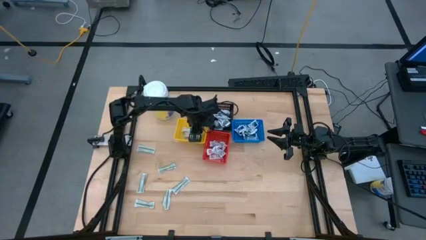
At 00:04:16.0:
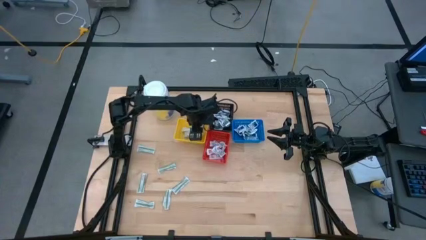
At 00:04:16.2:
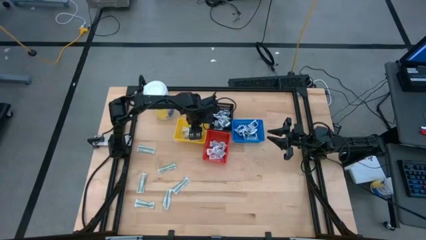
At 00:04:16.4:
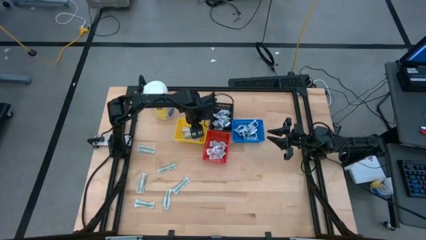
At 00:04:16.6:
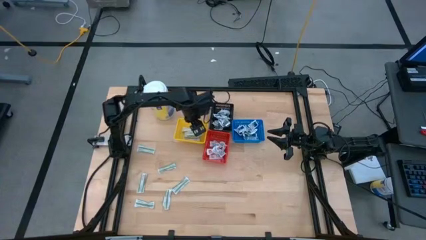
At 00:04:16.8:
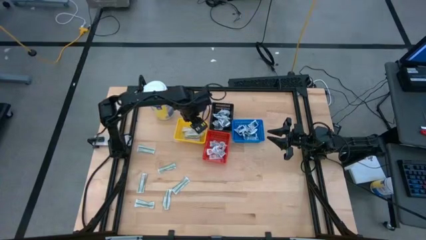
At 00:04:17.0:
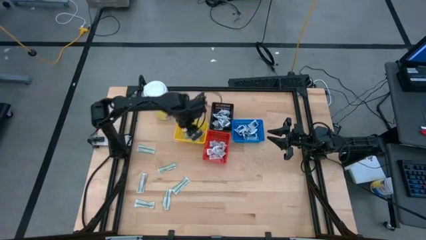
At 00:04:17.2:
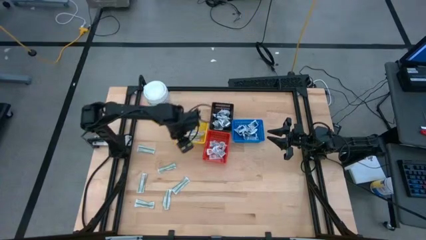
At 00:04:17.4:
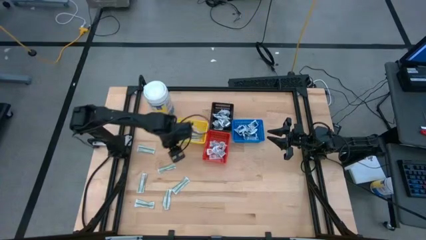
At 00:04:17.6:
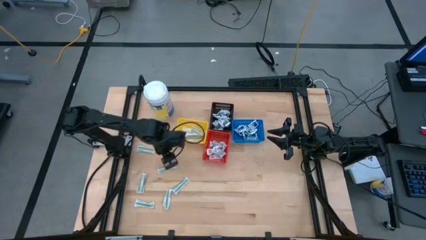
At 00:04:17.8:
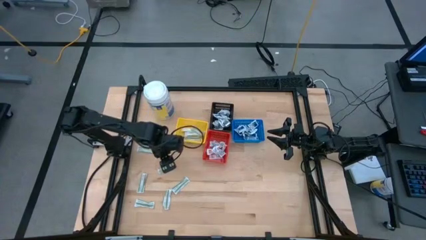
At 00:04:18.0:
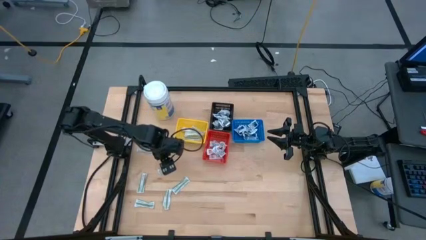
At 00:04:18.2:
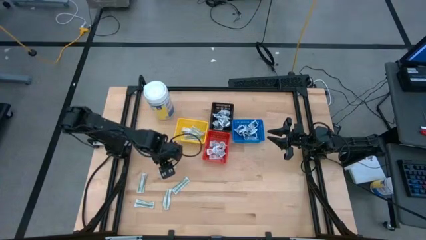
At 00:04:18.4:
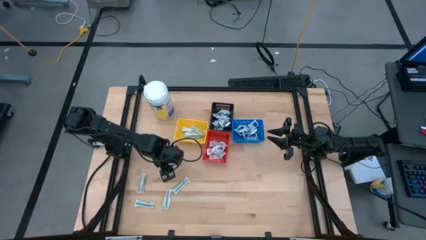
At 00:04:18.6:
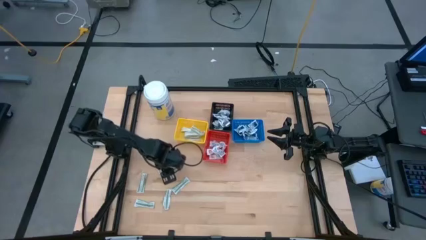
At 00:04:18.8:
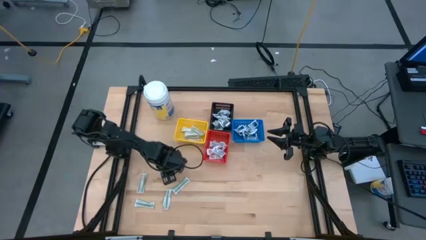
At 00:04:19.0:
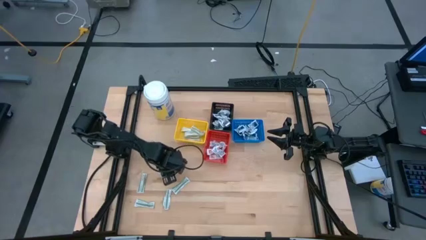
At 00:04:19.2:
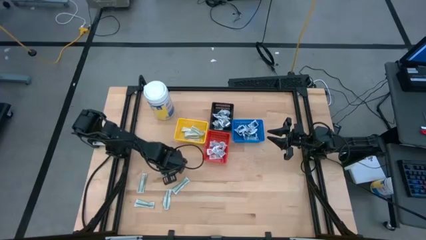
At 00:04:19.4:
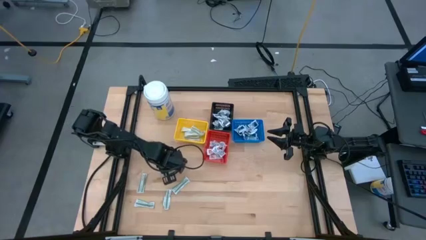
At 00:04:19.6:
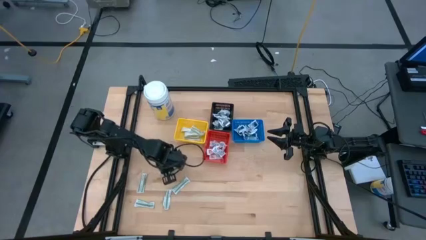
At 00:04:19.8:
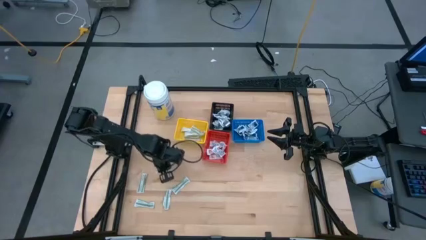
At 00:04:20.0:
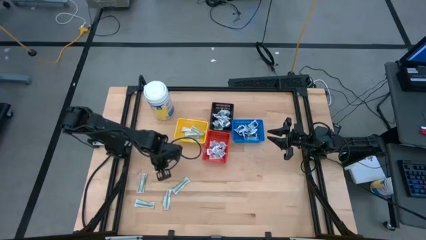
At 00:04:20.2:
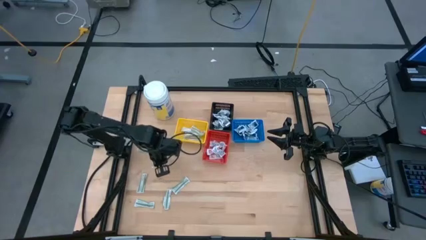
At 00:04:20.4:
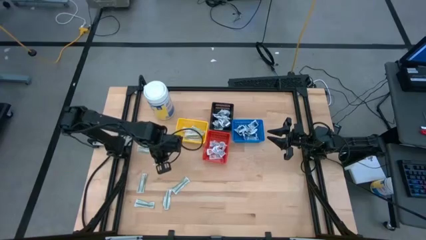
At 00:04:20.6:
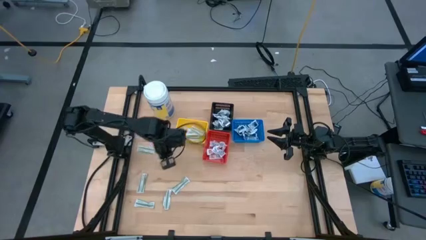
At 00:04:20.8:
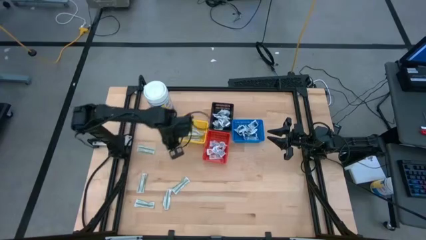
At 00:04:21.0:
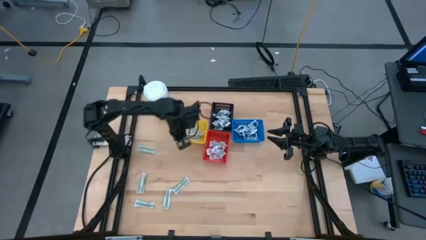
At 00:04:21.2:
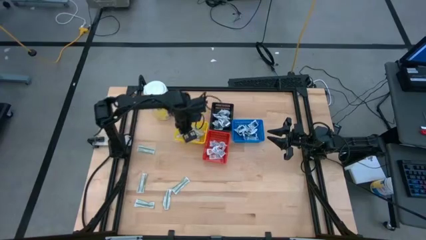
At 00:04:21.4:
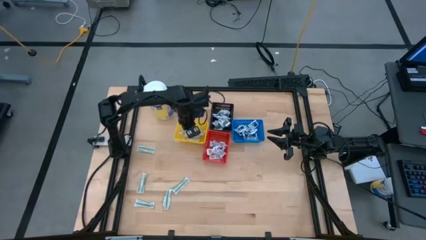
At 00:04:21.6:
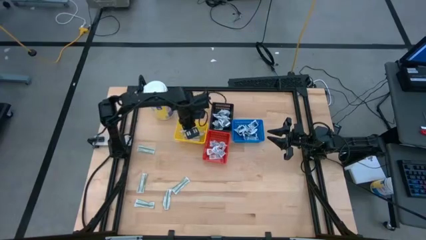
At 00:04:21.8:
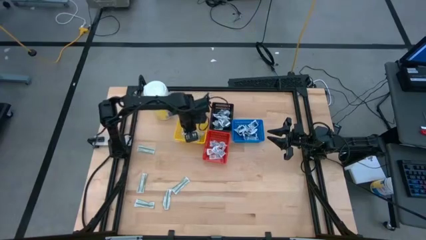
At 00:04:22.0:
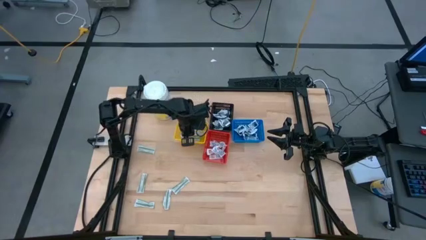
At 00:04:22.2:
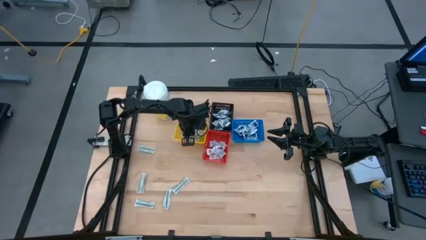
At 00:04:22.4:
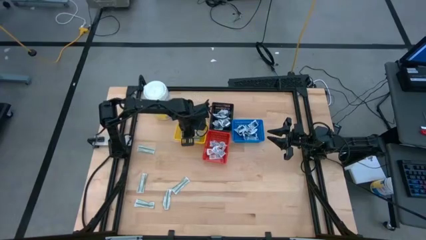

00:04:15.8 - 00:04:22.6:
Task: Pick & Place First Aid Supplies
Put the bandage pack into the yellow bin

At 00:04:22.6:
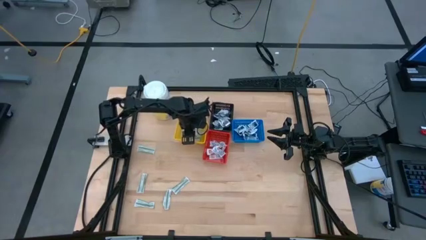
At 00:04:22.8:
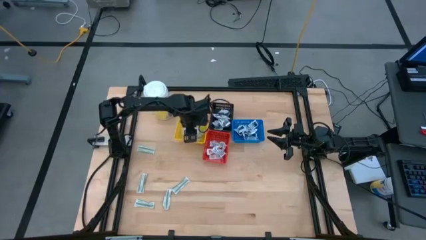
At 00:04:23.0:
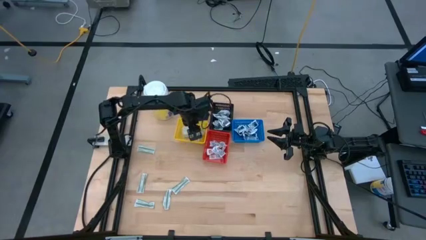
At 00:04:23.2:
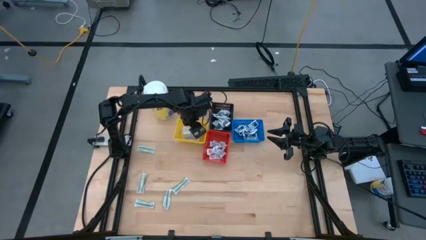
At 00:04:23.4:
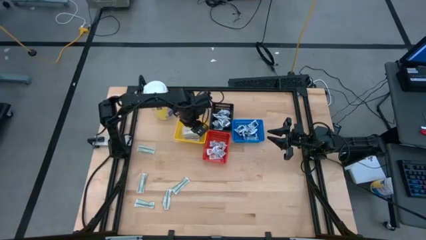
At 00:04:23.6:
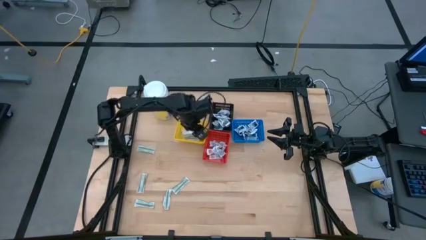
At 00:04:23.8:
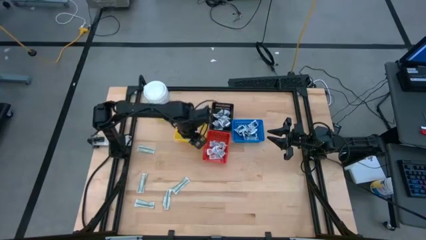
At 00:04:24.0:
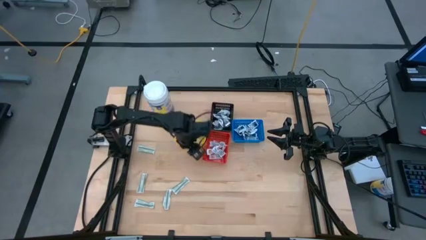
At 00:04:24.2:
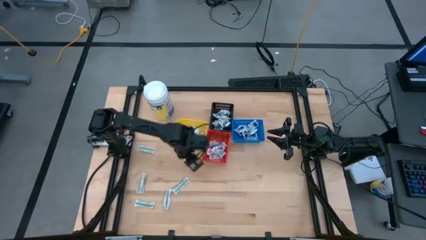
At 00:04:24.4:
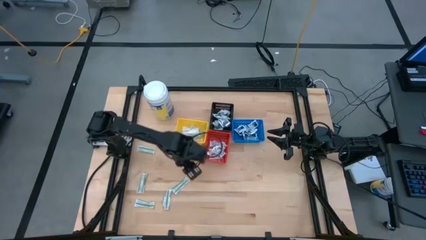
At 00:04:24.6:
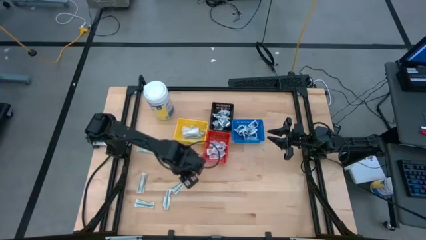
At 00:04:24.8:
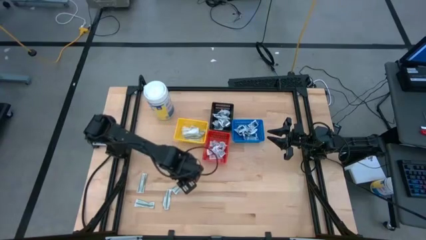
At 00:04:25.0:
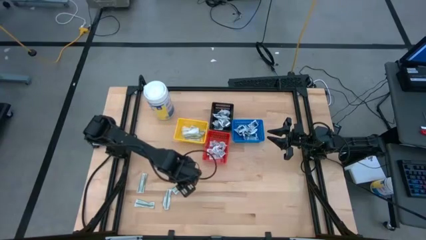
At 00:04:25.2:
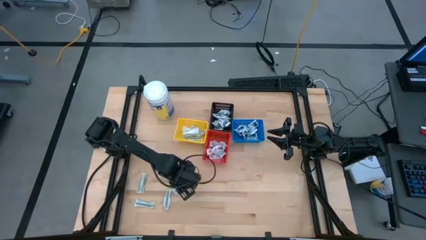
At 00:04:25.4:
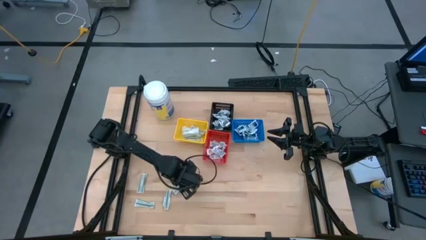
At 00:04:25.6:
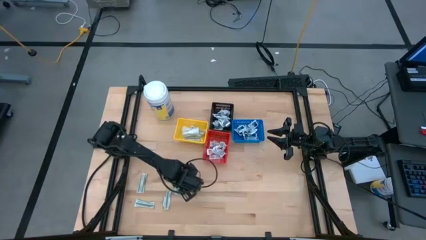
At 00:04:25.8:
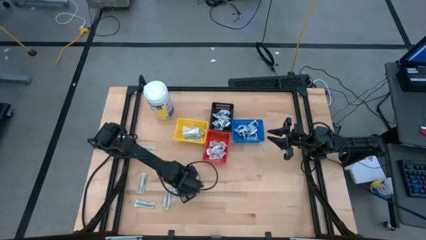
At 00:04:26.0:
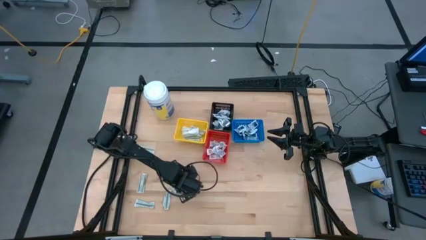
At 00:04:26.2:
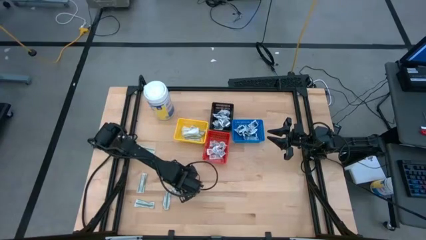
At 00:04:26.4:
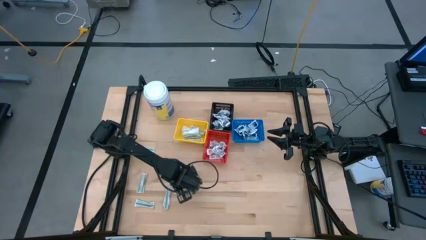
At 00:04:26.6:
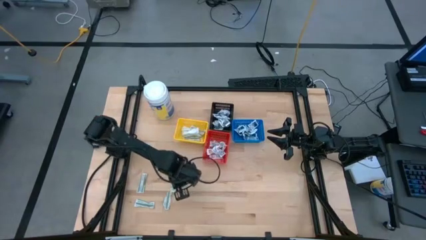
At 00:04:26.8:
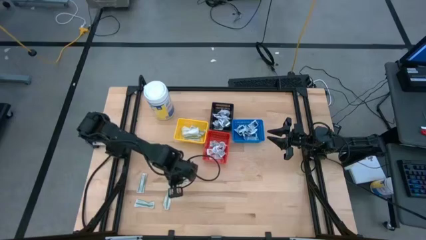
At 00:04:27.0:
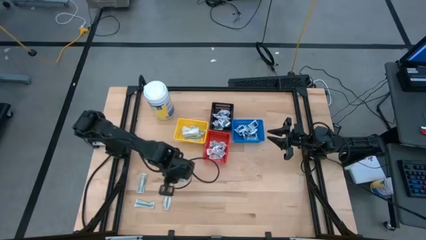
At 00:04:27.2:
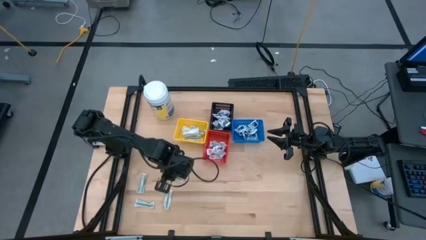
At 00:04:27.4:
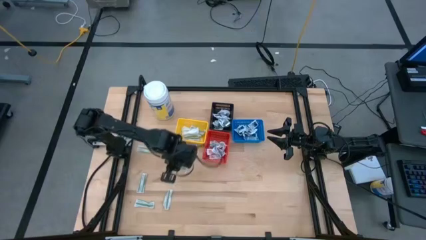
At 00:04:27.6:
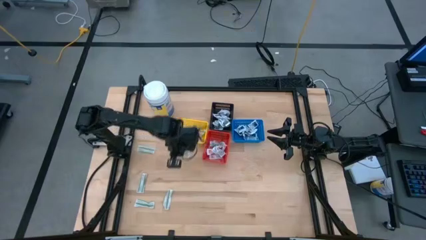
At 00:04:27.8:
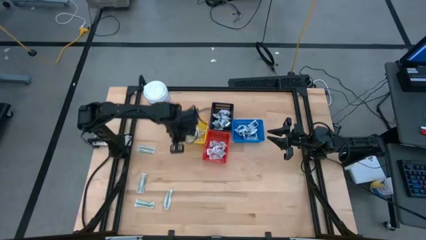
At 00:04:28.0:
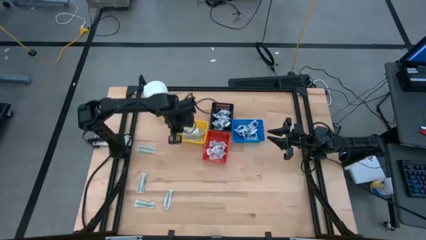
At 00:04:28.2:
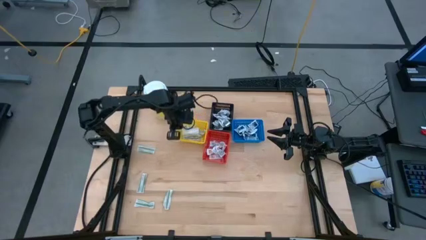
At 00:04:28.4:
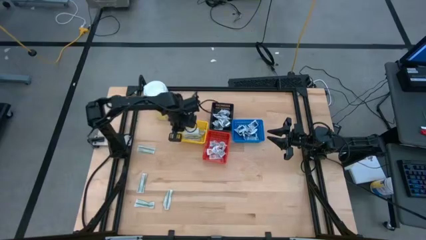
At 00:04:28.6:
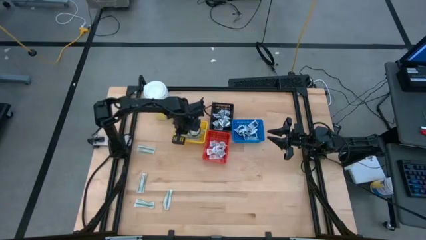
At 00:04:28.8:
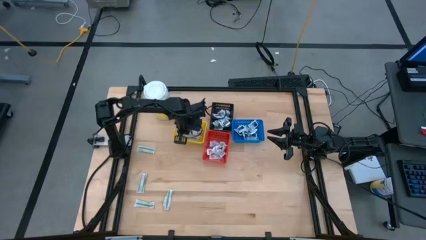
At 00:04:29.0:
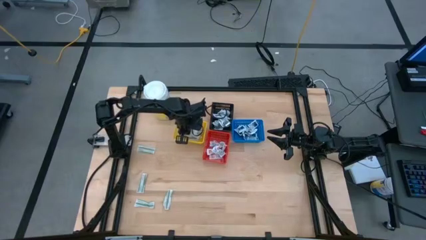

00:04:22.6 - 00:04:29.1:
Put the bandage pack into the yellow bin
